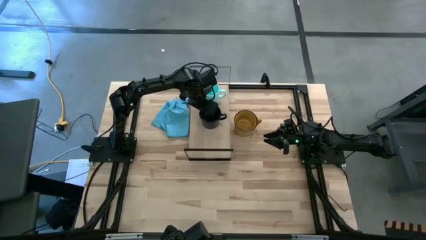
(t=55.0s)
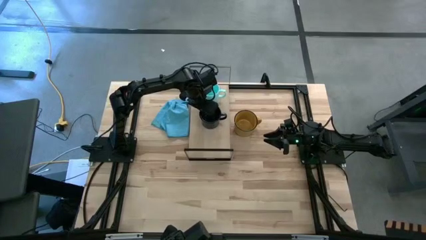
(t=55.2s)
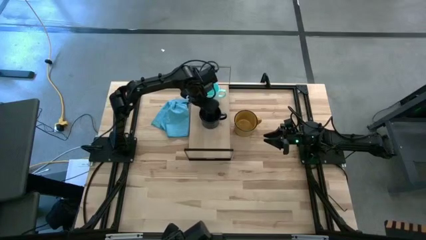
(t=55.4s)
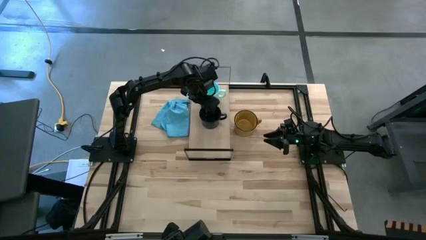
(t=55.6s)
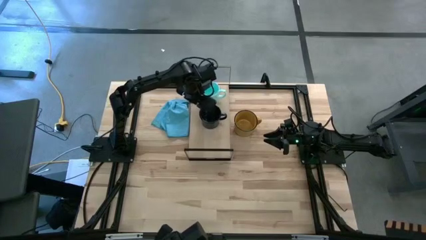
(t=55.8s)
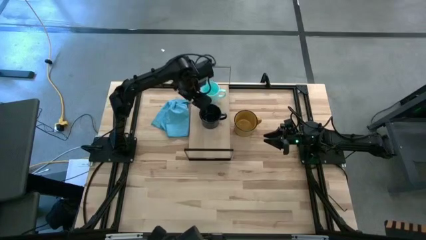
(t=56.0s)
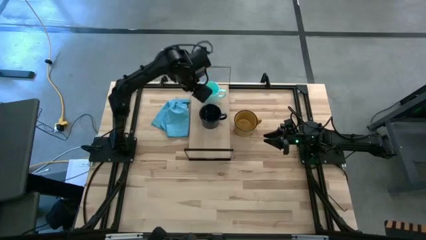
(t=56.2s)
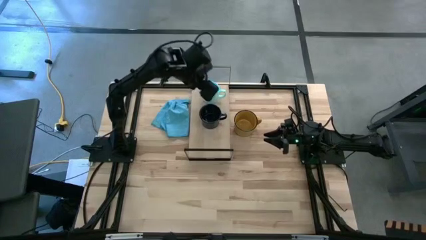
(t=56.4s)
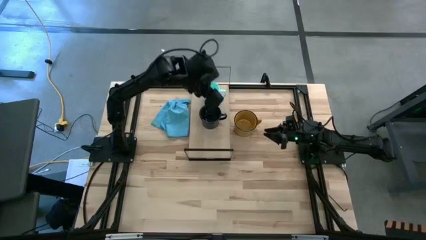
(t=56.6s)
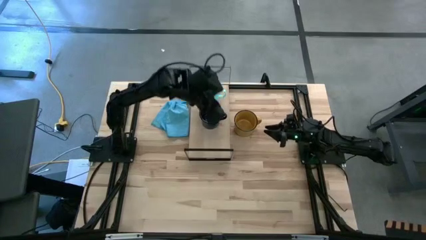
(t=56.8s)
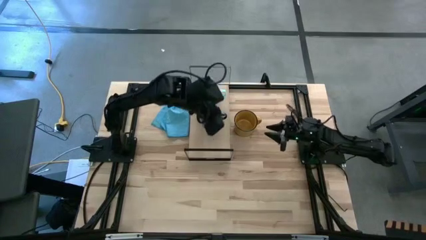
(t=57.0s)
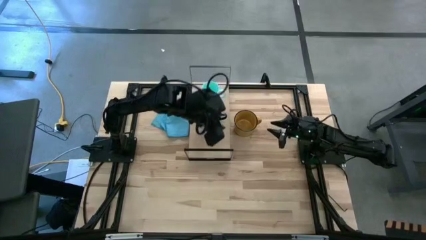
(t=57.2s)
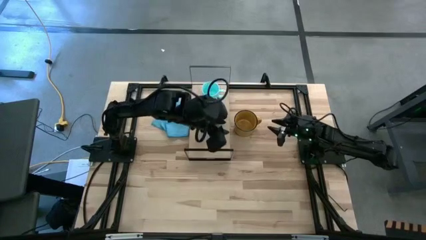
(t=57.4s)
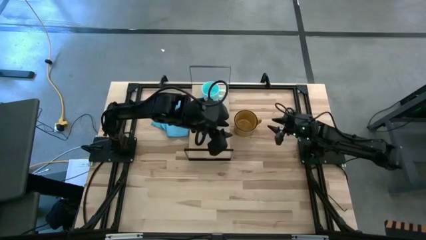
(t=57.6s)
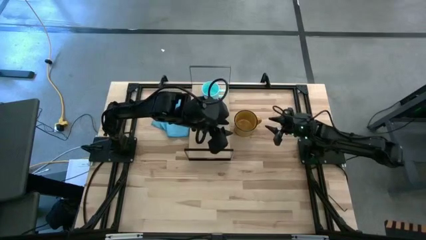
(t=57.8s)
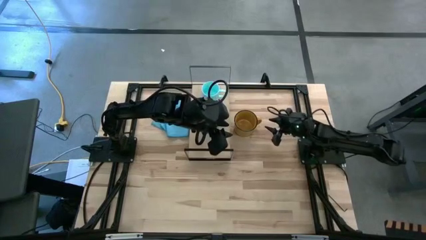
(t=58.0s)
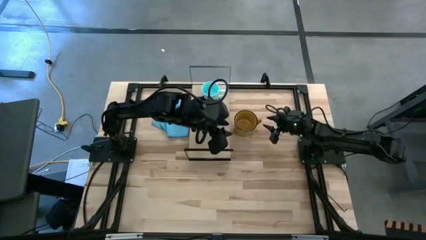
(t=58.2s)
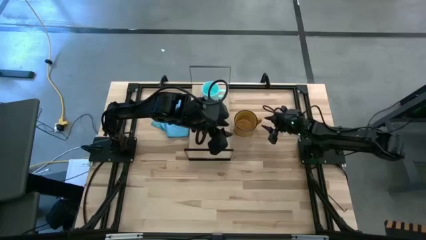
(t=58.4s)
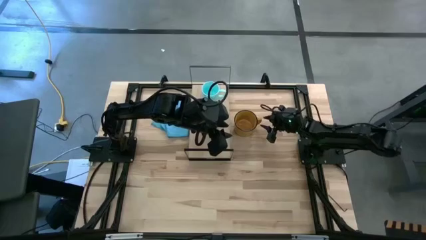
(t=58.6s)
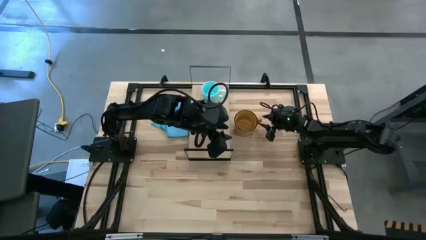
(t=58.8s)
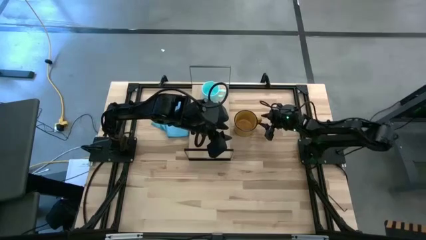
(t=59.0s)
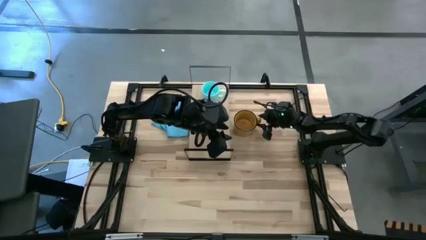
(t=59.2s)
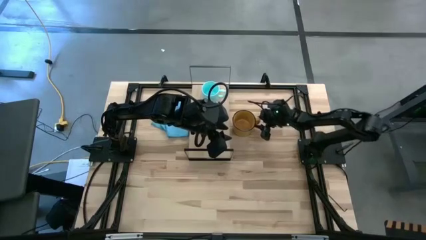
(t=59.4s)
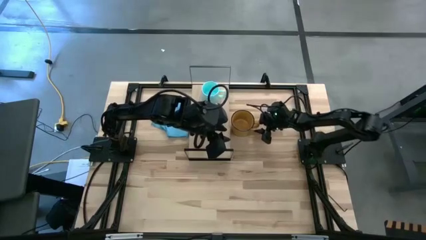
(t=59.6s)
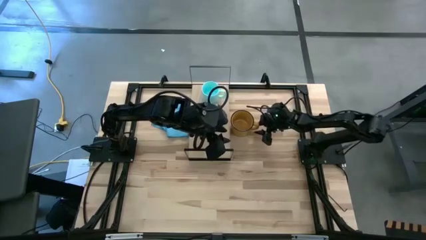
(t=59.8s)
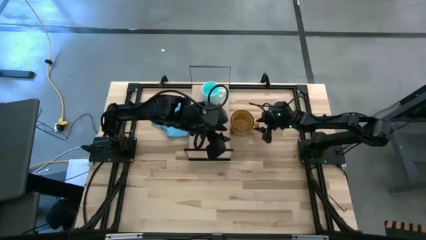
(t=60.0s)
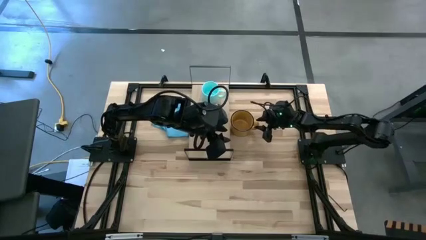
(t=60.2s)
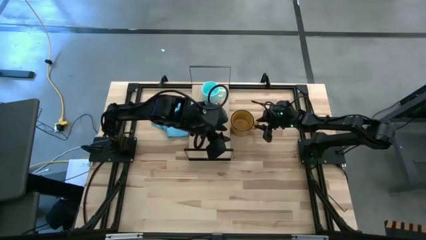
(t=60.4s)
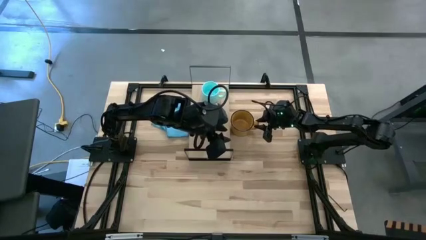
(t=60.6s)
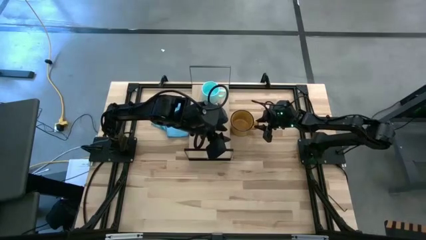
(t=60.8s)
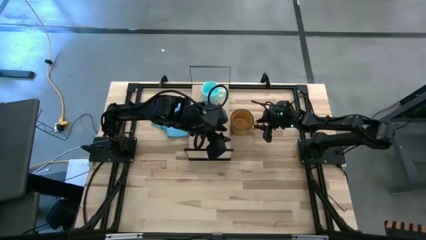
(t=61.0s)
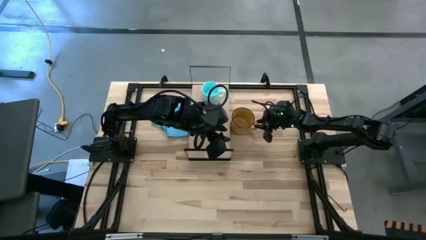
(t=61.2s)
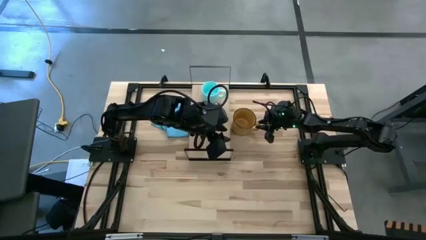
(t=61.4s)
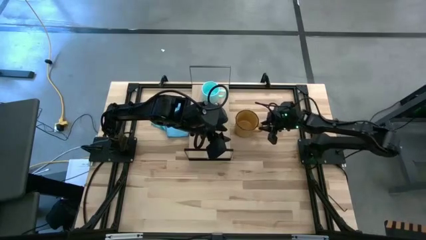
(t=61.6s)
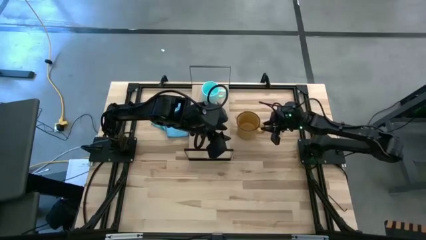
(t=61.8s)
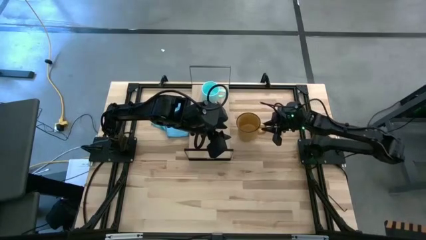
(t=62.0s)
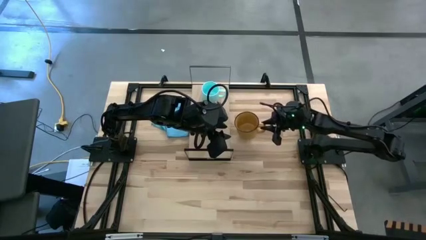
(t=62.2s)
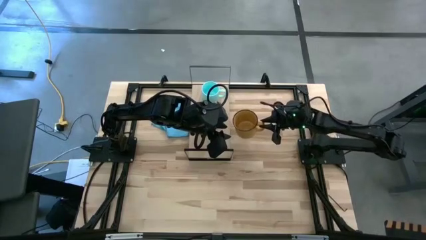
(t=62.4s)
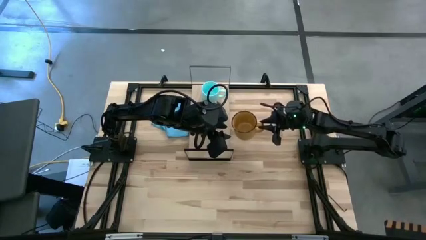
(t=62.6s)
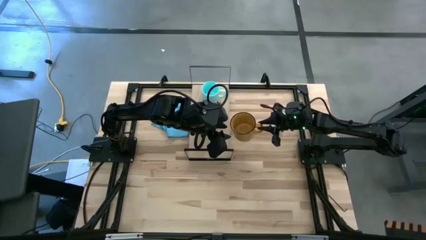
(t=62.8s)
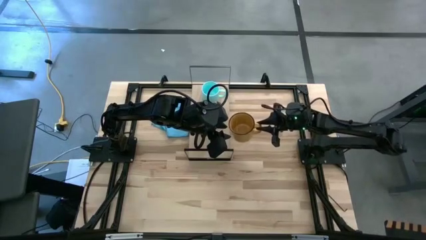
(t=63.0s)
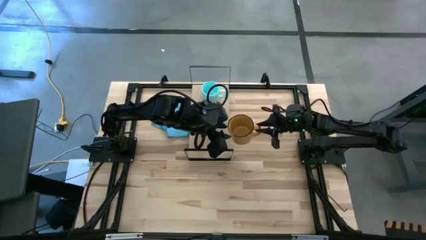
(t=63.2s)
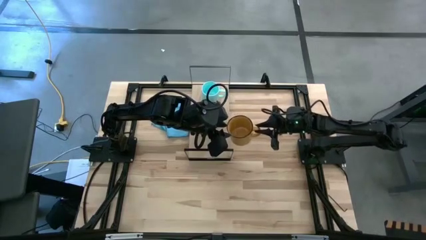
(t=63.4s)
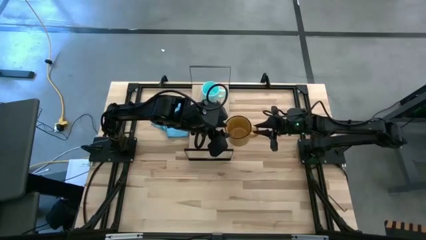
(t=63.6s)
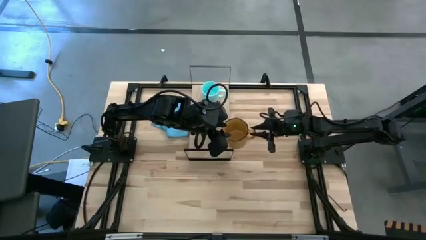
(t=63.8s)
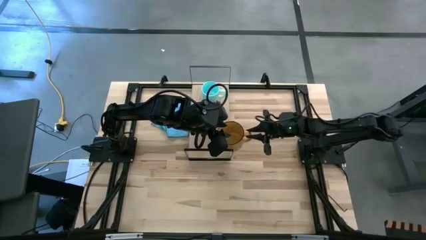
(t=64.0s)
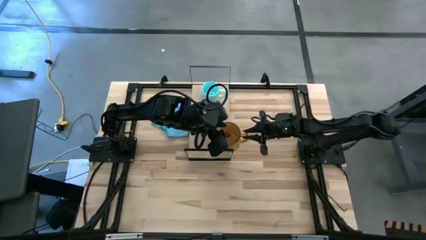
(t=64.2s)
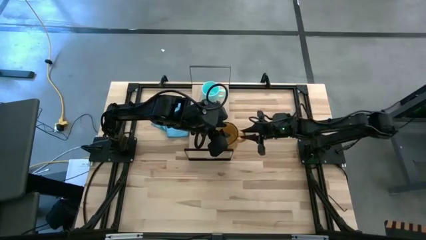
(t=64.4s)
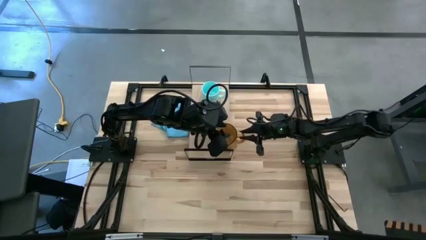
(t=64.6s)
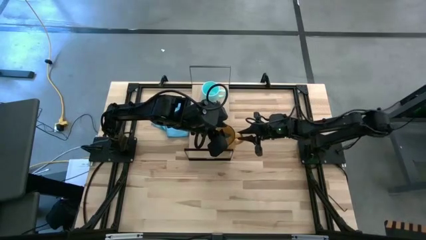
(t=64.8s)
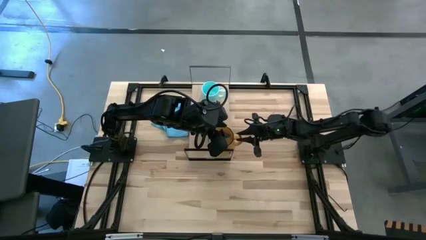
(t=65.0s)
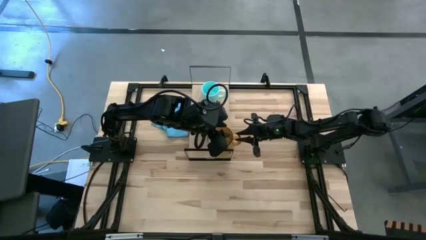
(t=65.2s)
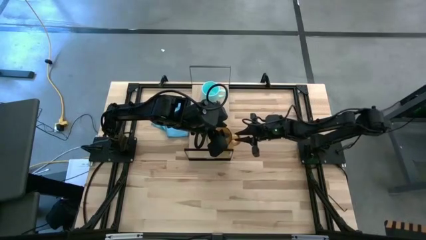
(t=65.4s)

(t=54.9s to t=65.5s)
Task: Stack small to large cups/mugs on shelf
Put the yellow mug on the shelf

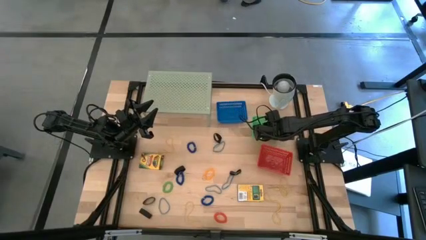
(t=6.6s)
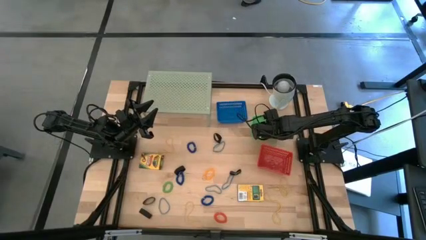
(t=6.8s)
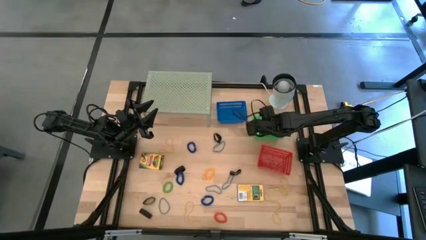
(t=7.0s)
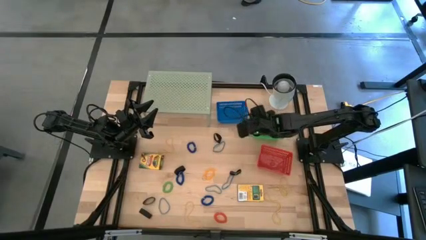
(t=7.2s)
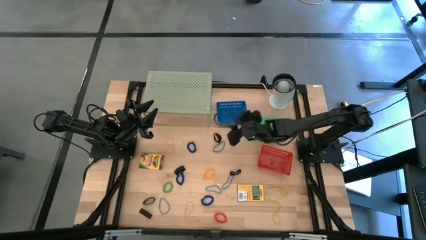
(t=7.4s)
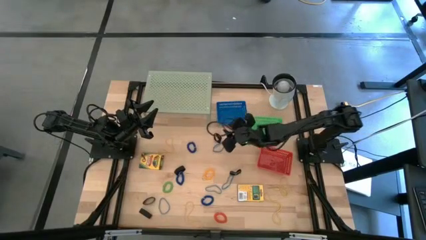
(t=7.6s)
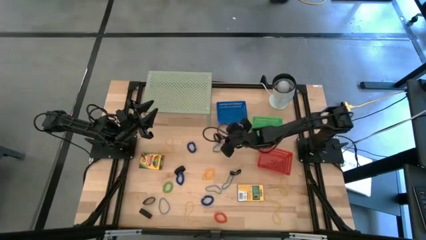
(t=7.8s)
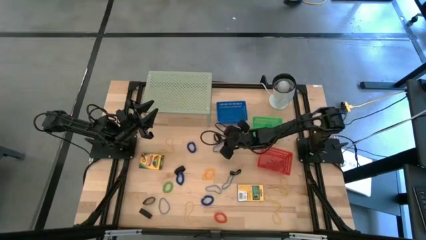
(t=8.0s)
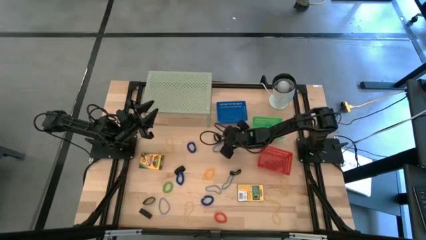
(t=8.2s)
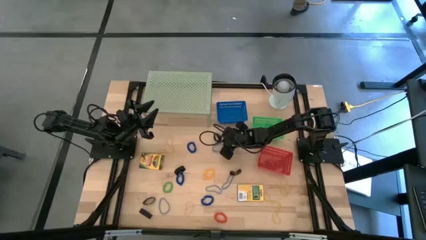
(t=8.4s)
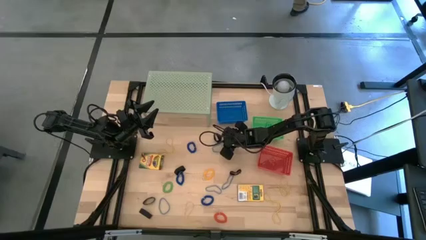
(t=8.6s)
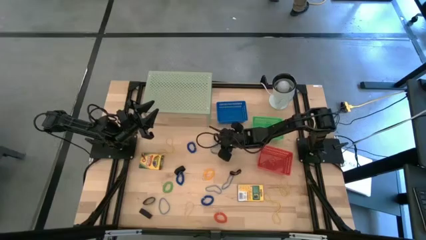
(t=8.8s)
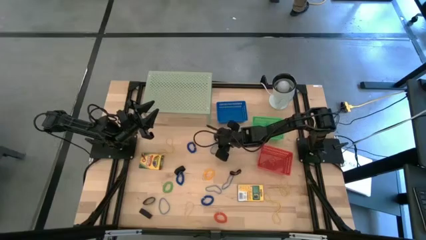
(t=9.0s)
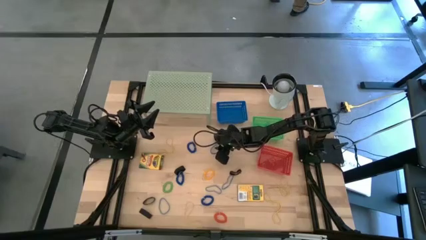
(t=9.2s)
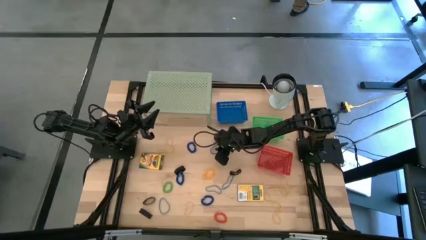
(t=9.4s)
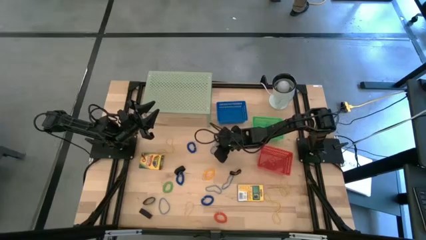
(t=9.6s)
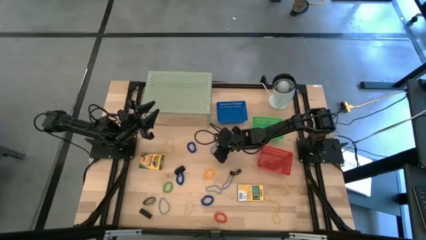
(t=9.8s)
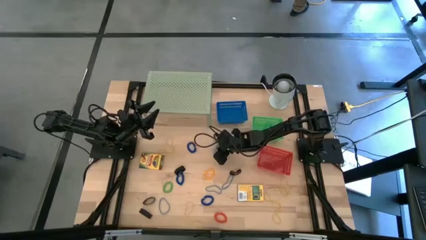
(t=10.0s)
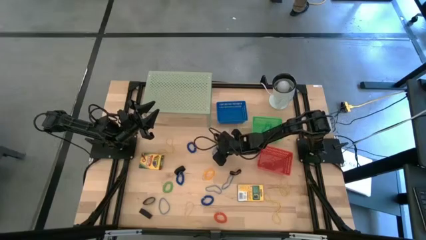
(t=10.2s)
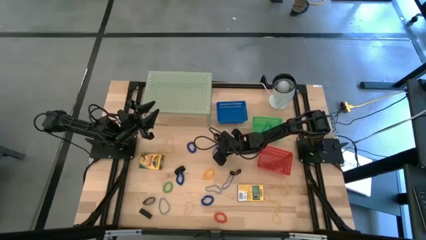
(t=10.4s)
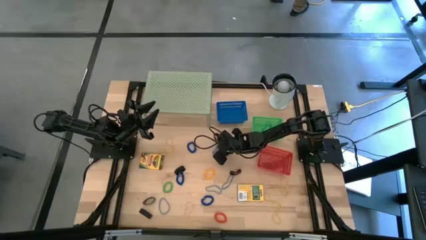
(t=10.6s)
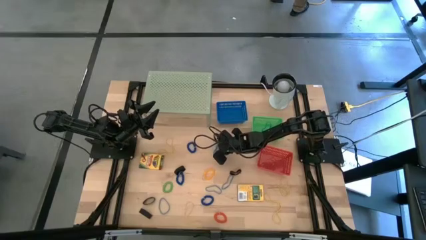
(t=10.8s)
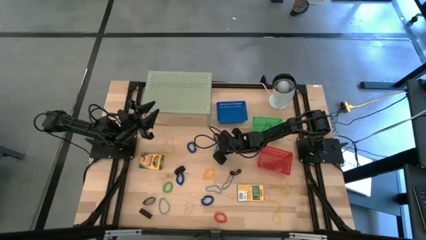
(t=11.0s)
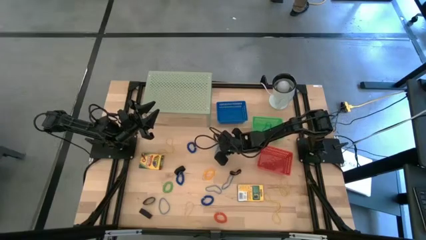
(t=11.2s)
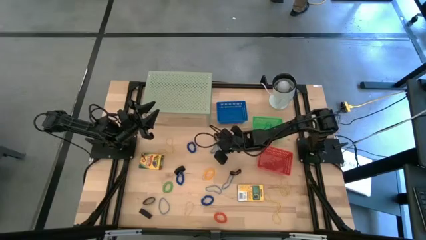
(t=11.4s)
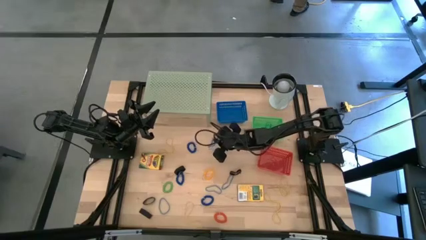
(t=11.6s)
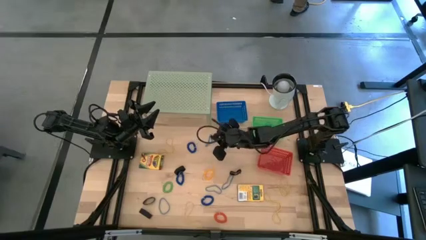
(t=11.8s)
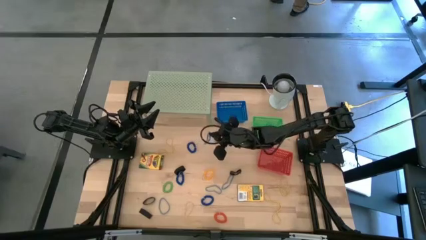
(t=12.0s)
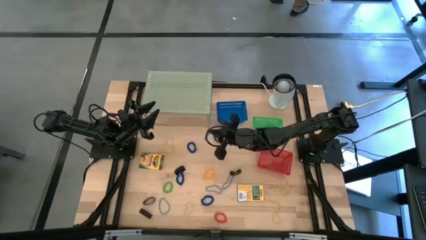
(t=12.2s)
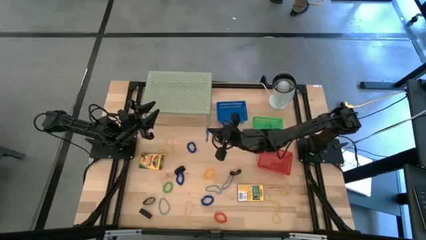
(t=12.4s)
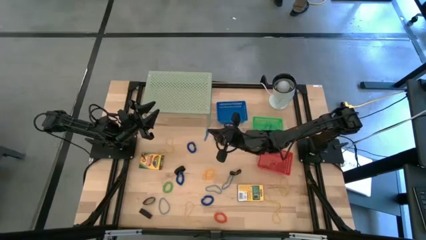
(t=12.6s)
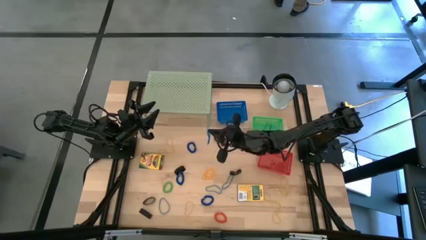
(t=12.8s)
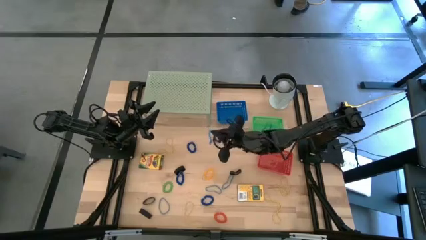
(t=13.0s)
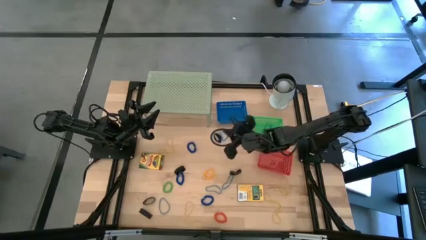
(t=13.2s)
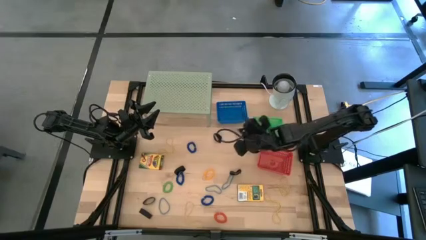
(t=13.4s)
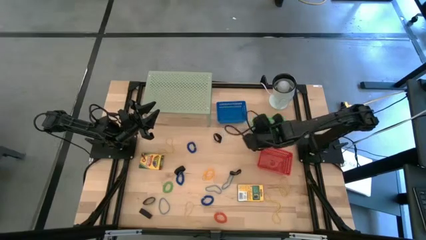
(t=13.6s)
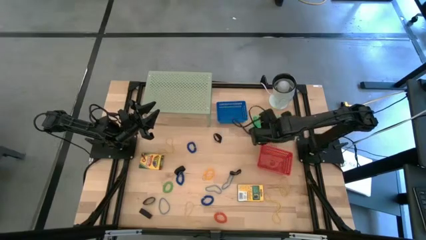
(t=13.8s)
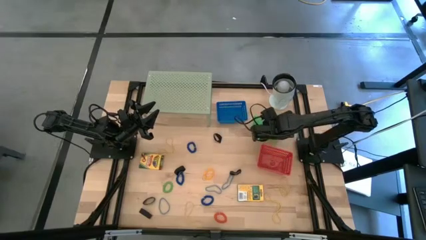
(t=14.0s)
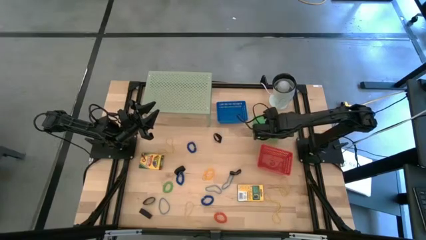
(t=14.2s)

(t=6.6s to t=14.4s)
Task: Pick & Place Office Desk Supplies
Put the blue rubber band into the green bin
